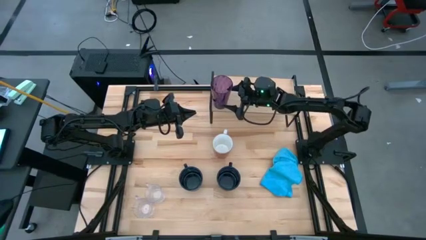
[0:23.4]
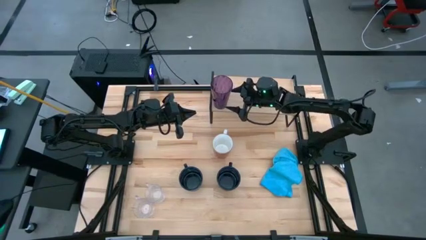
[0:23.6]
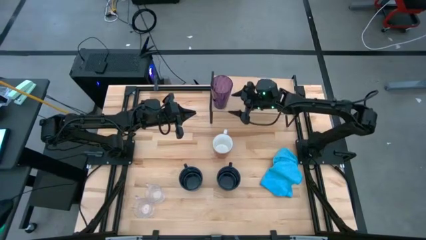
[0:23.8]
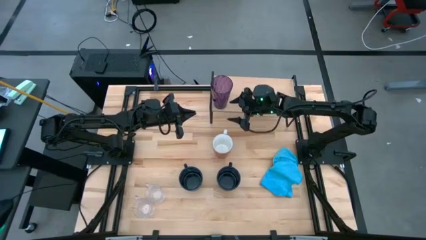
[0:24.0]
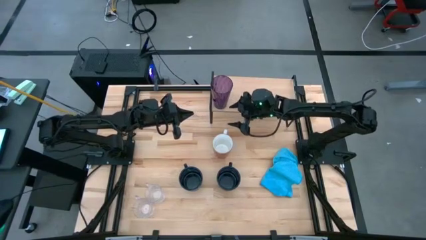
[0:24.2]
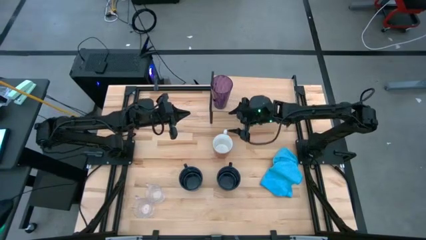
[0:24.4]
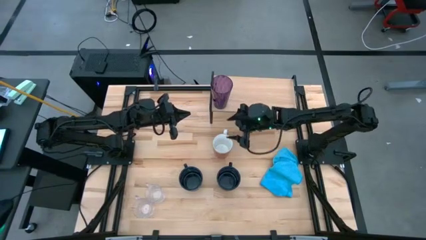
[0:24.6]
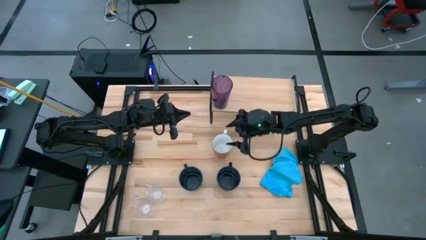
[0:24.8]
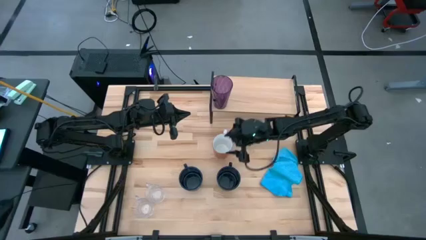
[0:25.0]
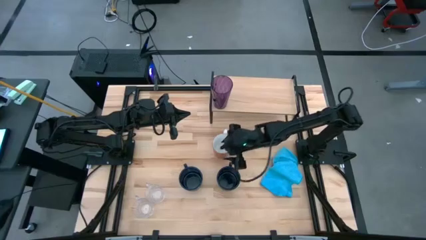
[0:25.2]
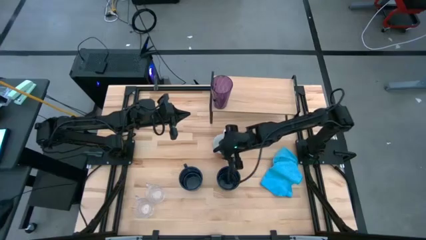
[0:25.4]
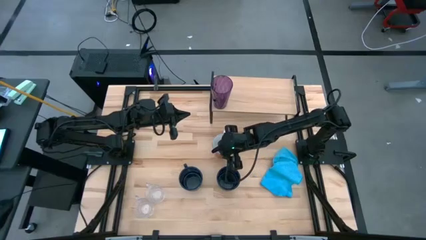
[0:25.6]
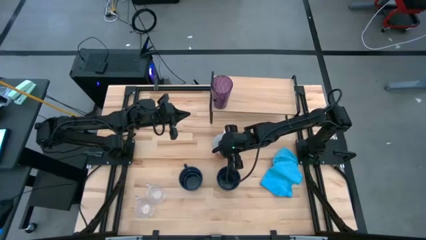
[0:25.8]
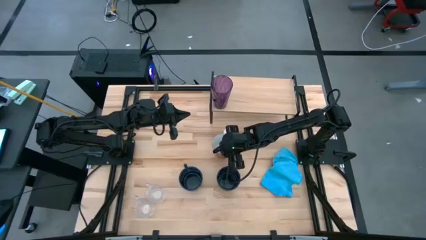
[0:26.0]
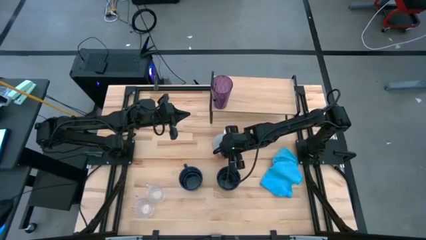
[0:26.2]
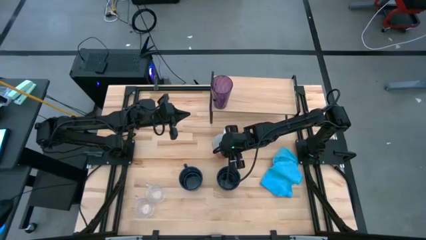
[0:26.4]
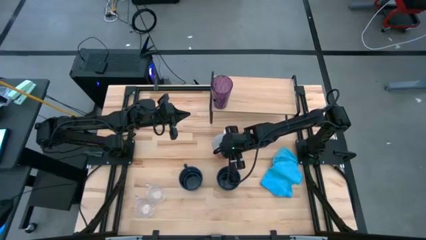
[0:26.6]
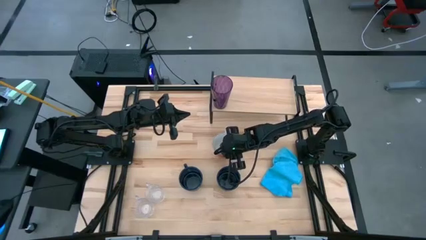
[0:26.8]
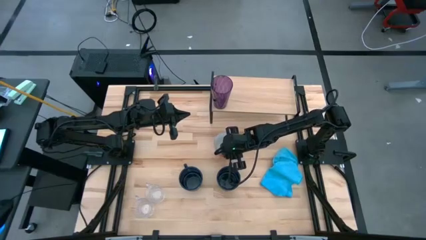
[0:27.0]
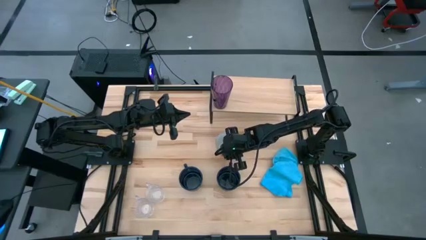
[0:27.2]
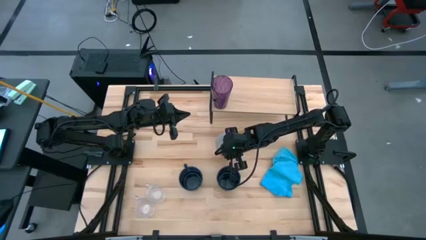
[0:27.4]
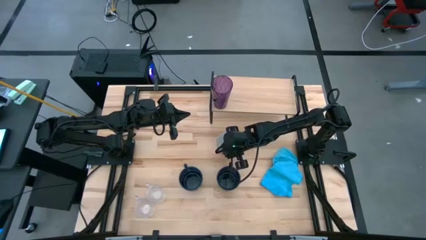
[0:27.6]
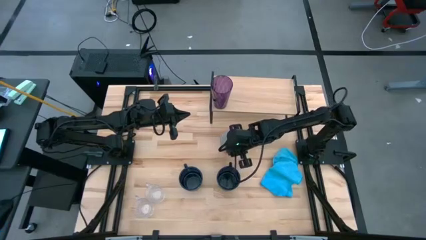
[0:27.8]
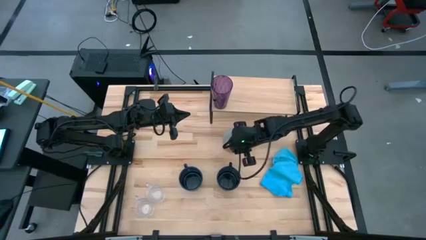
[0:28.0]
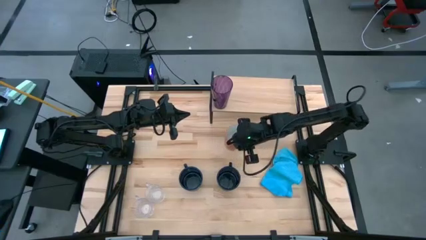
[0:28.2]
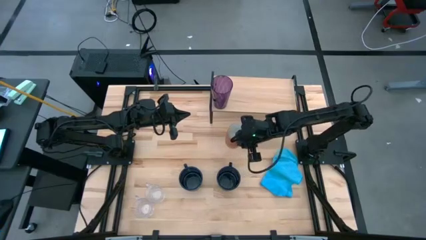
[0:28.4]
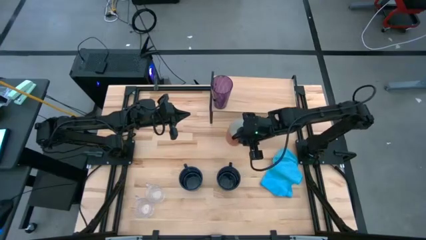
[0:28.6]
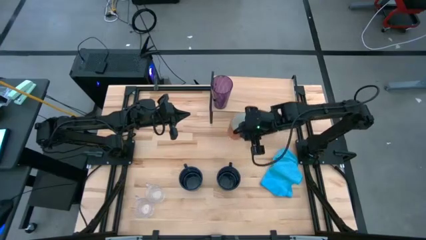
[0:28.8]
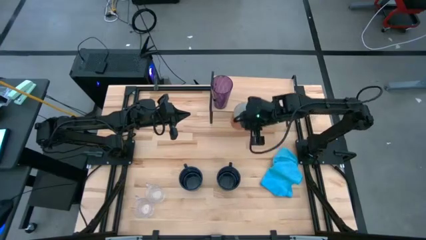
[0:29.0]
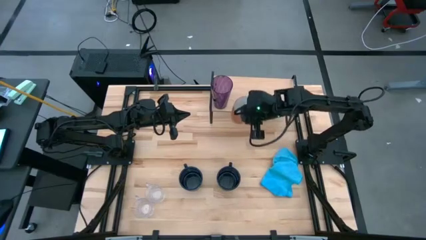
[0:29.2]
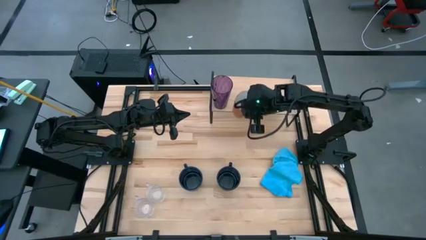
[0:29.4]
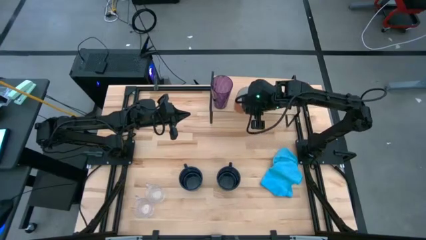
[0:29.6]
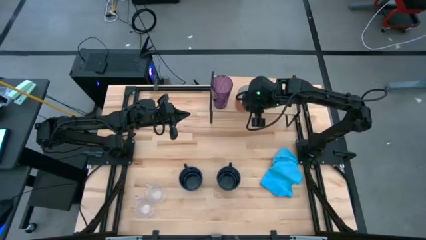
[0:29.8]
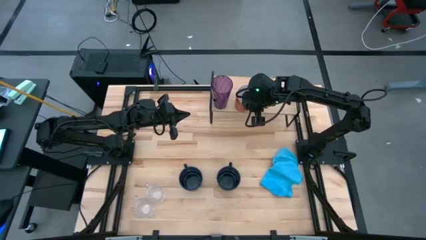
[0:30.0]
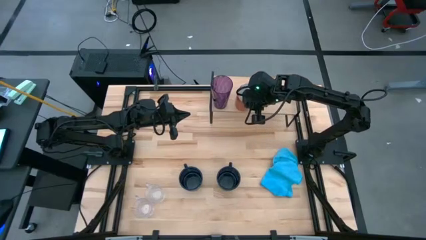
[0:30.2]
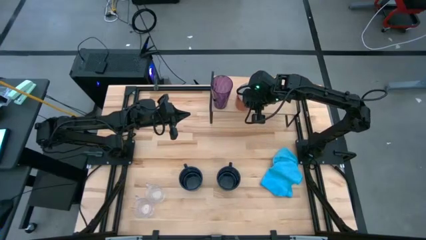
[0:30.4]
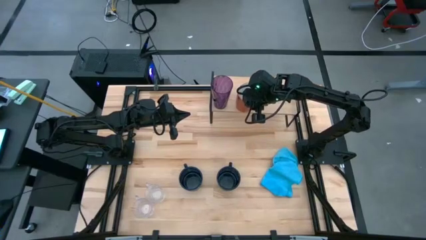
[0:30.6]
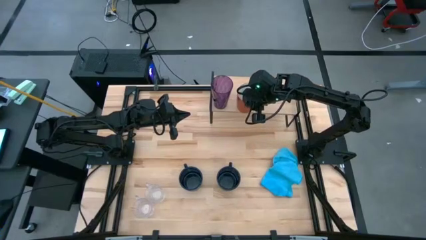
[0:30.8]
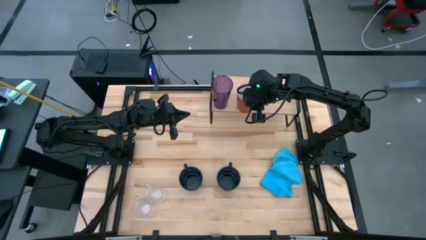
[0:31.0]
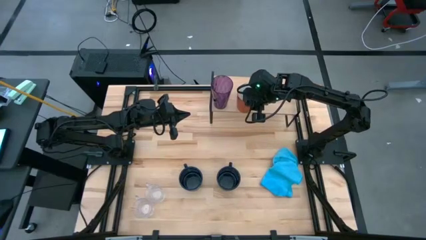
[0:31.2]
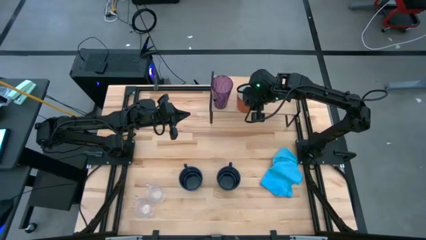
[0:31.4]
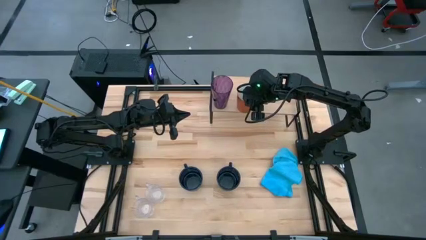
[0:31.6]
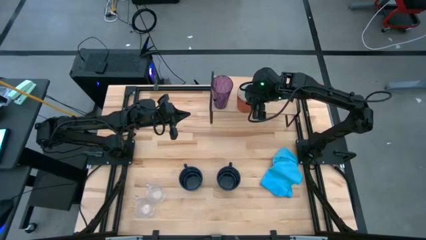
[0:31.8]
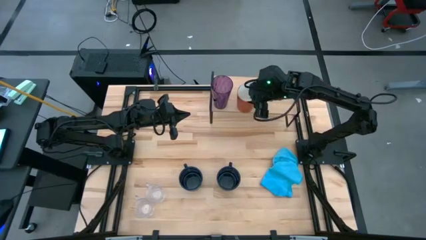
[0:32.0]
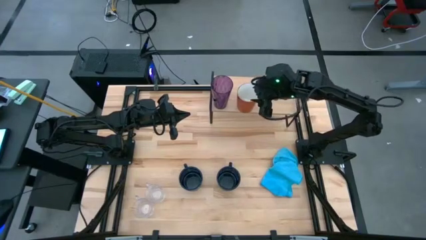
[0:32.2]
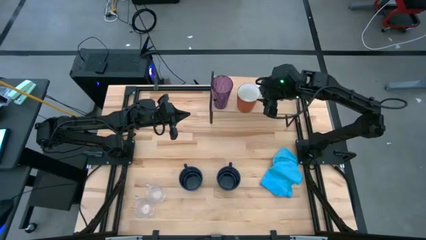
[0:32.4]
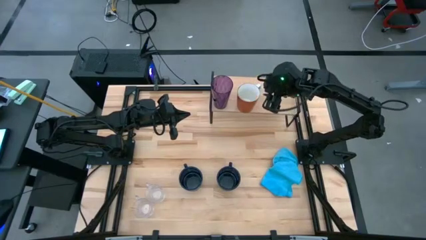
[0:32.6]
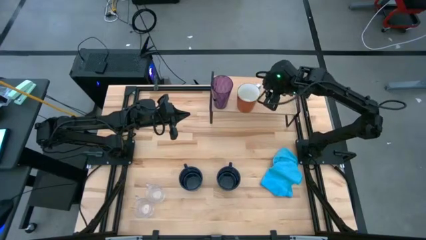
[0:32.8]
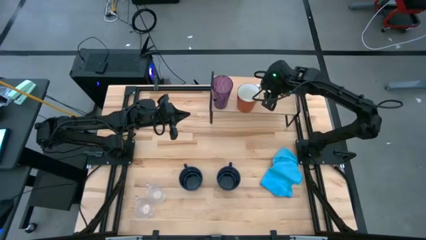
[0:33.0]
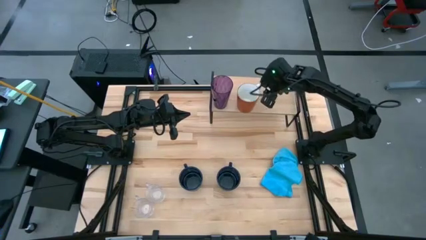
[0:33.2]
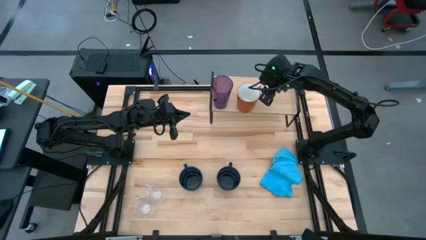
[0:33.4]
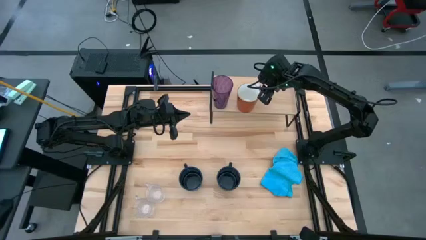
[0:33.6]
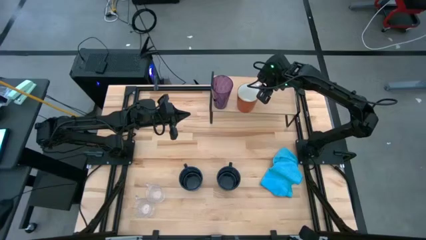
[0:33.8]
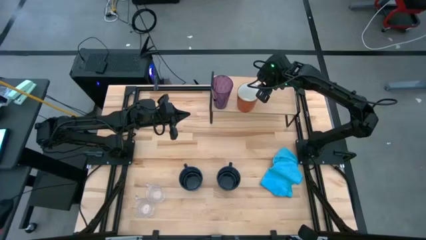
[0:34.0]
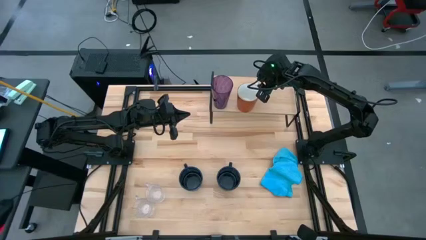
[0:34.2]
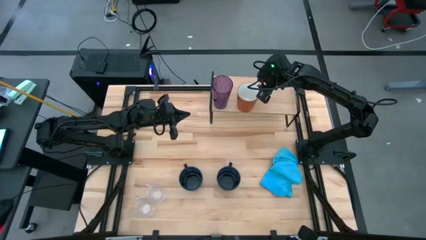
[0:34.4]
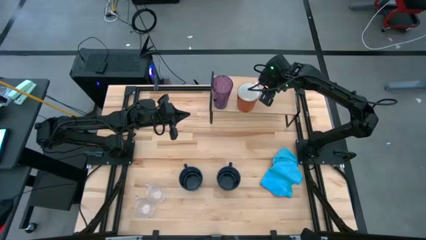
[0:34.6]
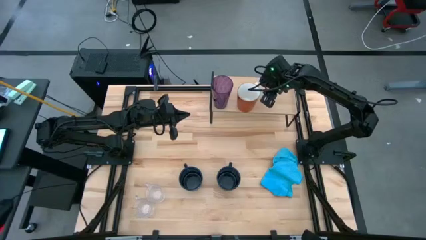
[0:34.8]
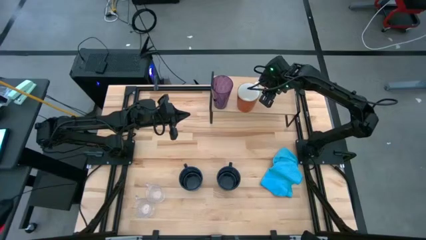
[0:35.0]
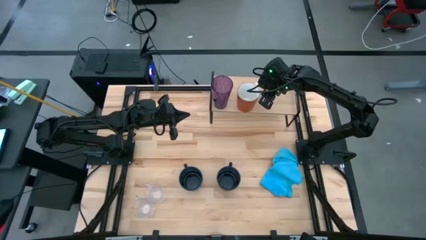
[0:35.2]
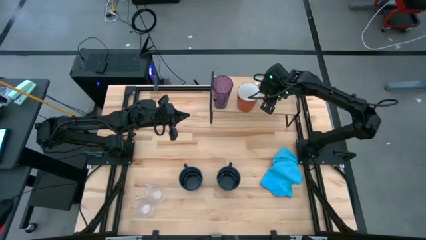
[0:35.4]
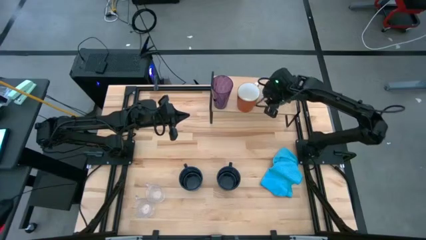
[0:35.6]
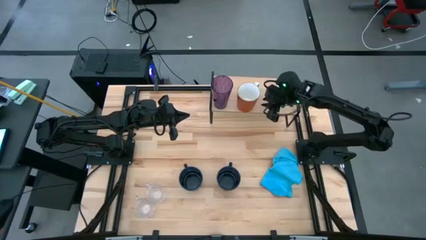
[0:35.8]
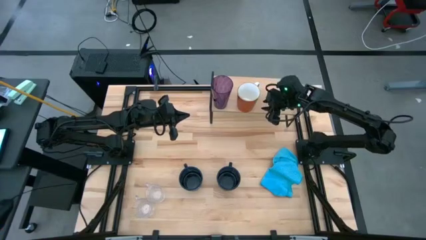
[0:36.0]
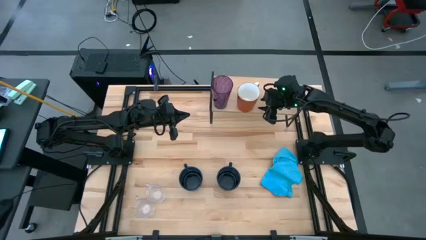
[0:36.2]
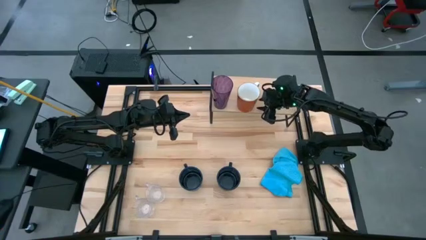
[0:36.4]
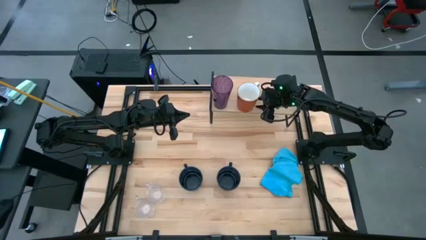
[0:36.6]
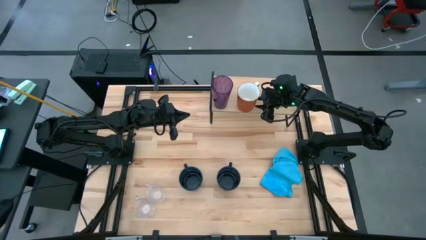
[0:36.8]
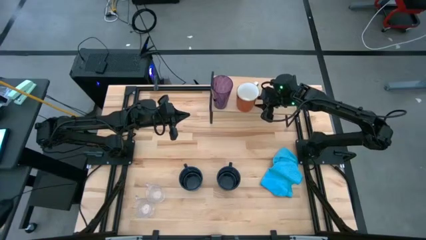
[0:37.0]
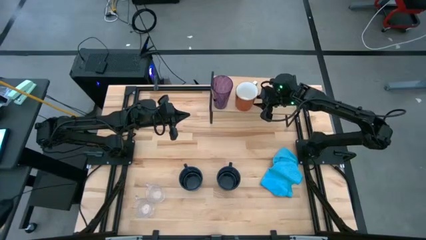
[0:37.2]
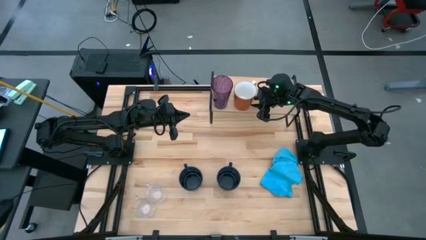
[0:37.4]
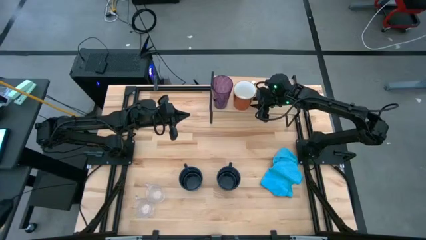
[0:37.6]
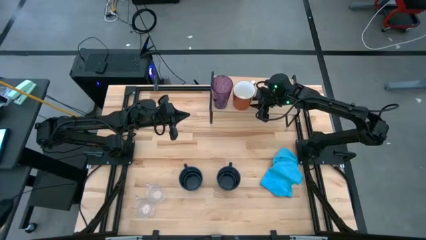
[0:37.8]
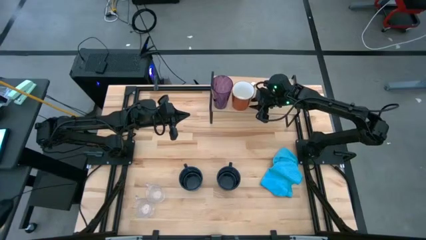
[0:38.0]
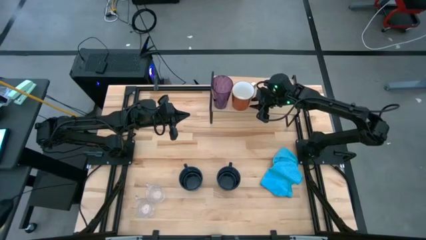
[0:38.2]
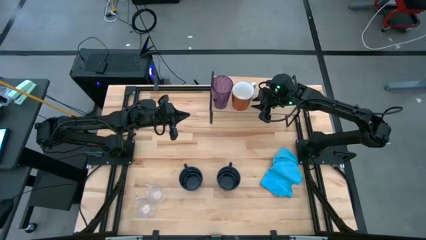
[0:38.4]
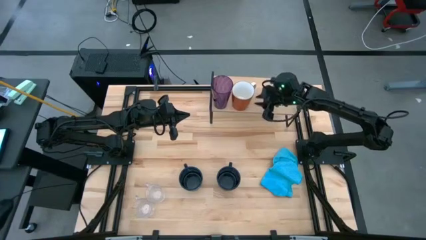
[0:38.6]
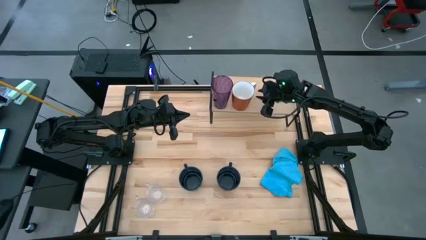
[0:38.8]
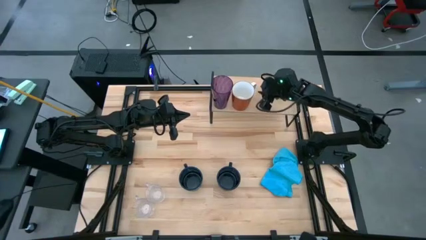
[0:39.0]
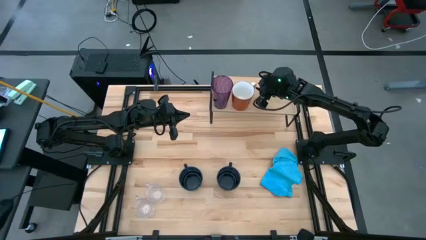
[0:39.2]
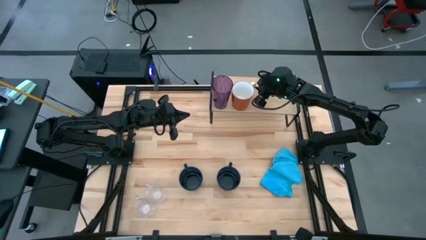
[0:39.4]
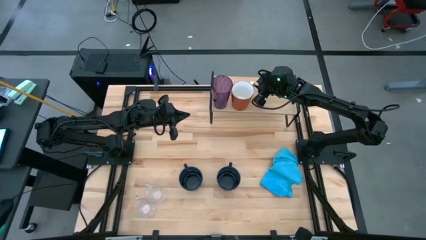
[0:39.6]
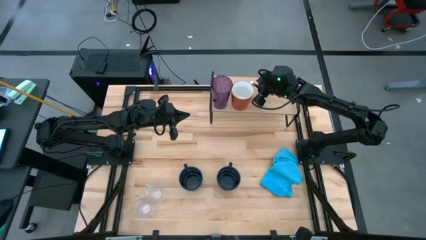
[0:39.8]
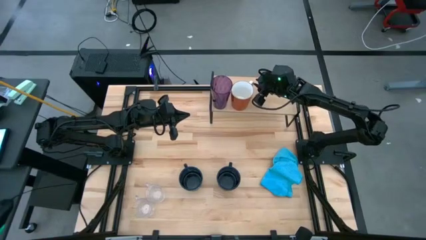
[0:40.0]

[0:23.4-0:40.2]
Task: Stack small to large cups/mugs on shelf
Put the orange mug on the shelf
